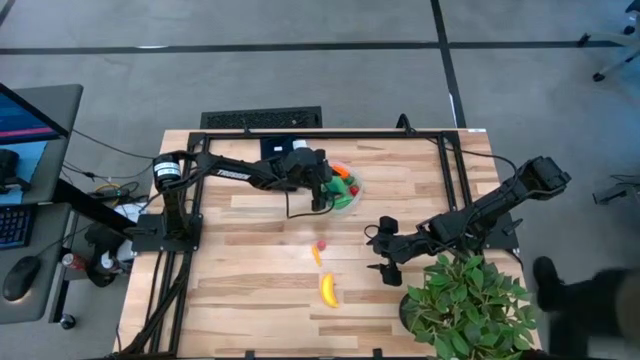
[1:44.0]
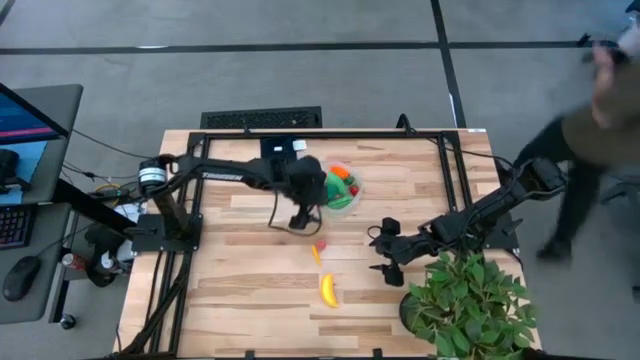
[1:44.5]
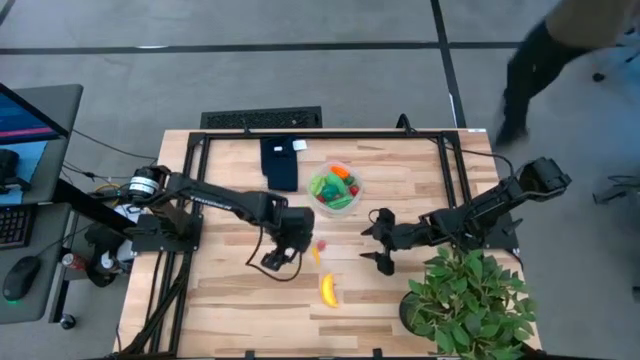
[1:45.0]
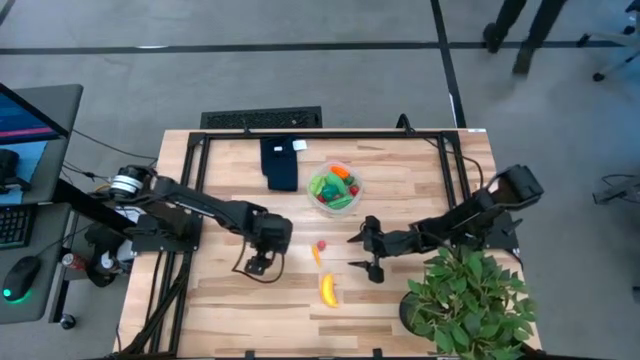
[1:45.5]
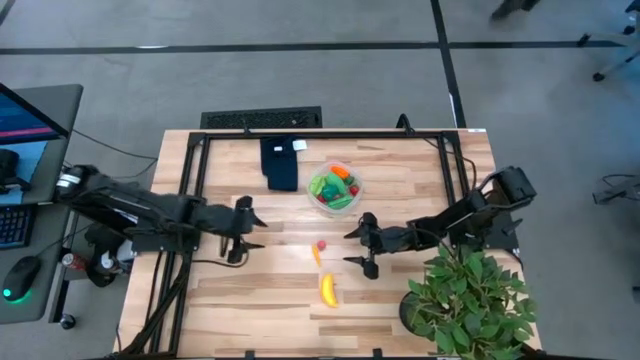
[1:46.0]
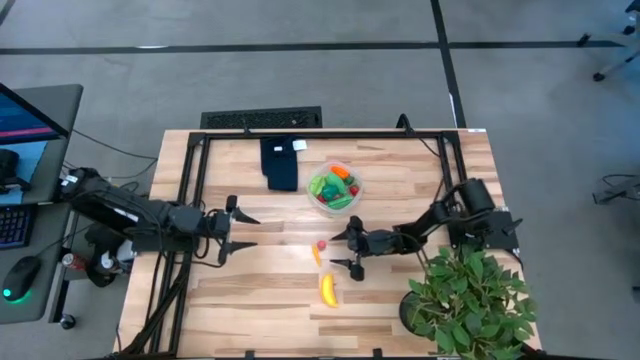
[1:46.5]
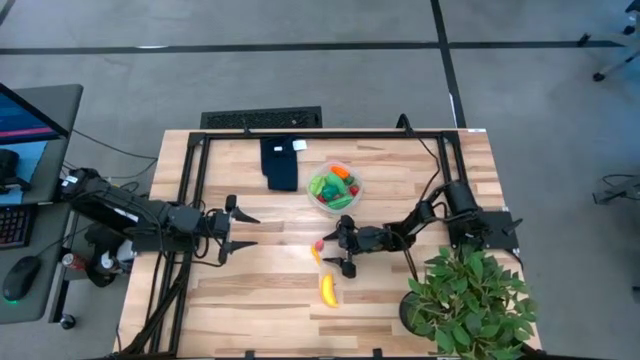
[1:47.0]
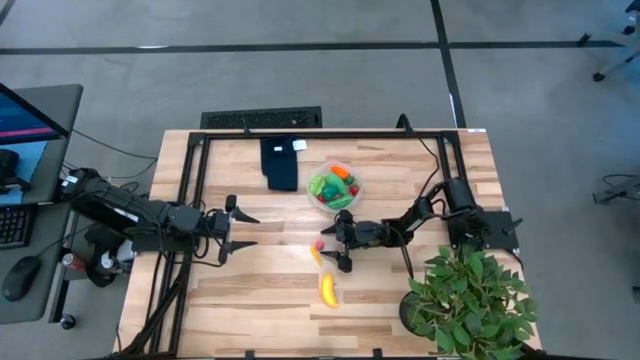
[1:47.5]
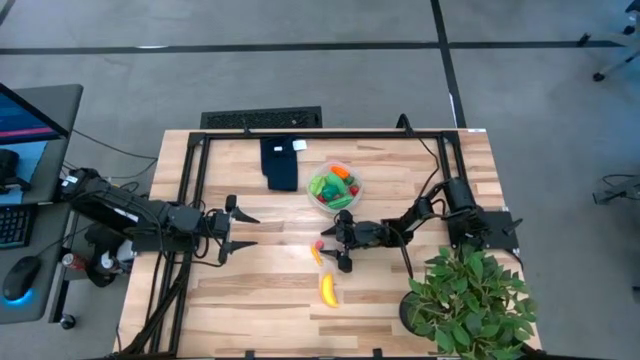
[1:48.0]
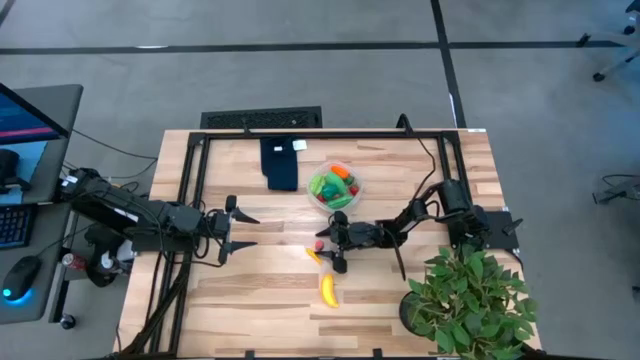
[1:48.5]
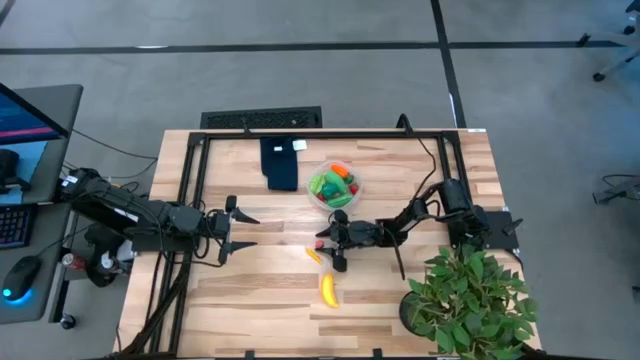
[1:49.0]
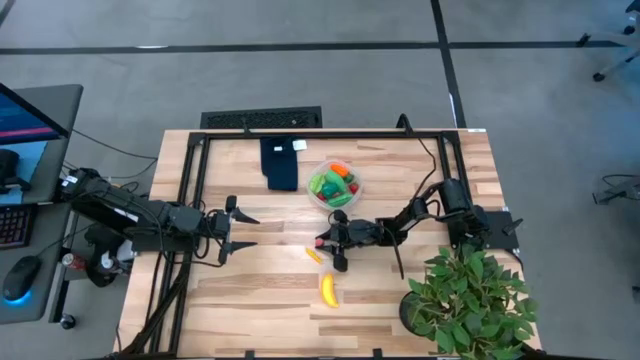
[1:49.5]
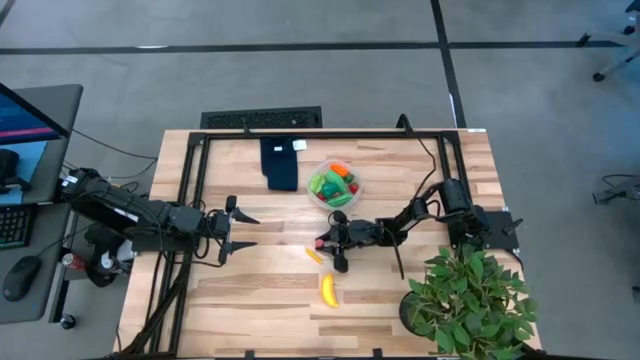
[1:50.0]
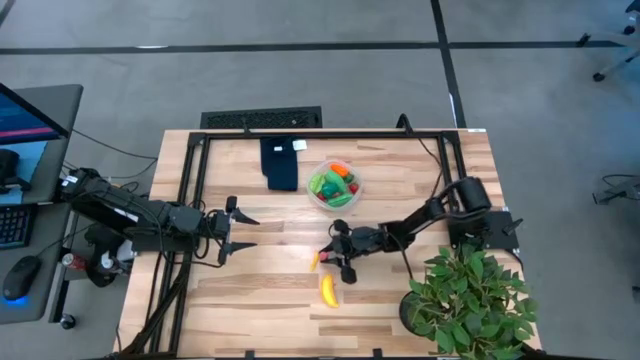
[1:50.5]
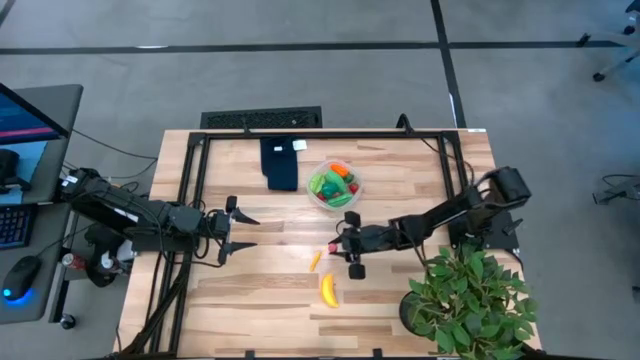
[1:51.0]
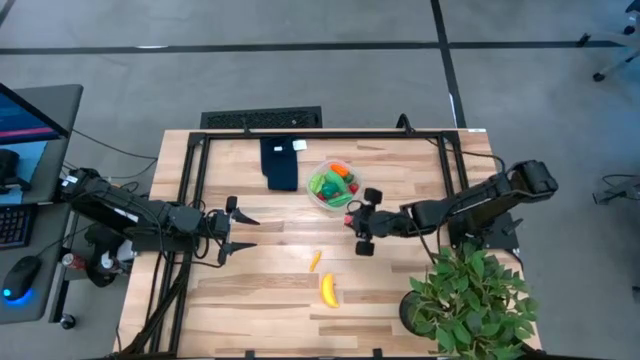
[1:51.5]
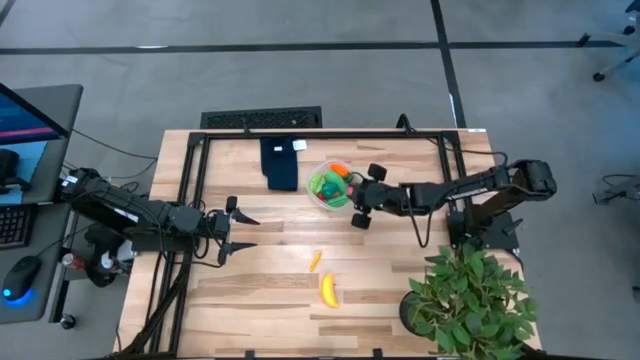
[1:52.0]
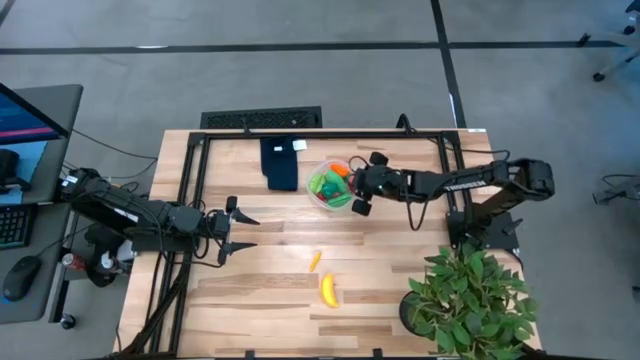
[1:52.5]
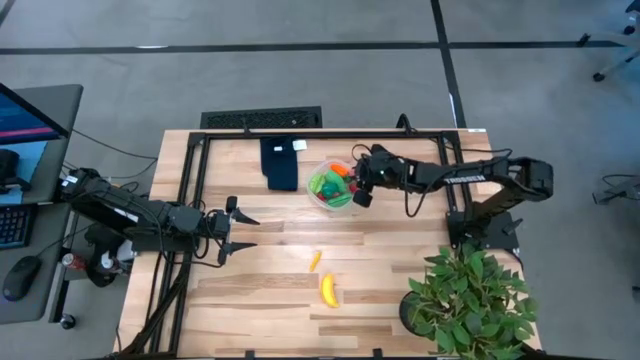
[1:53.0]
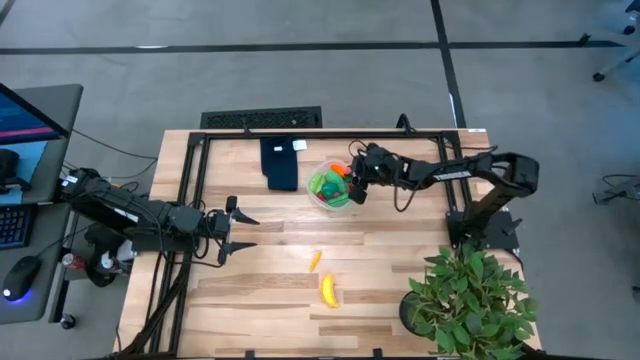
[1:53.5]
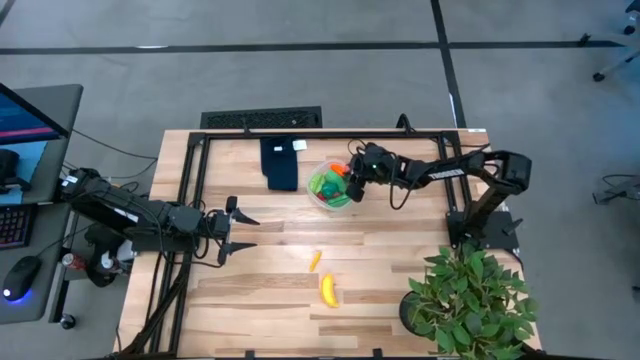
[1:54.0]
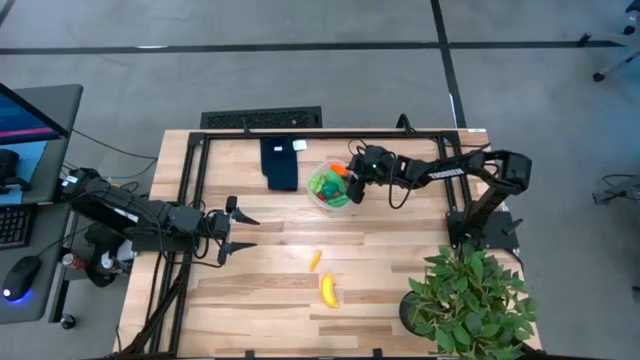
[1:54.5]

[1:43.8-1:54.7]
Task: Pick and placing Produce into tupperware
Put the pink peach into the transparent container

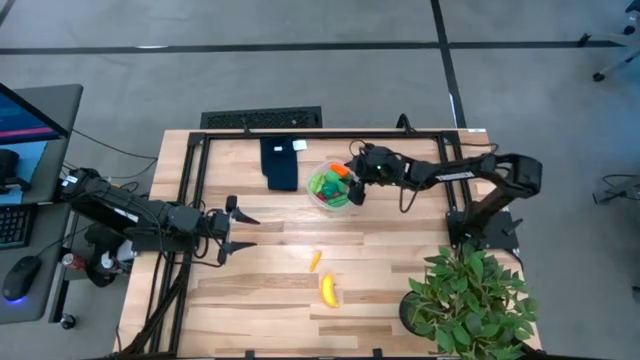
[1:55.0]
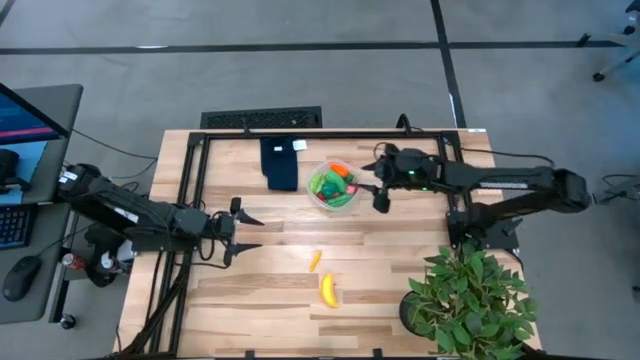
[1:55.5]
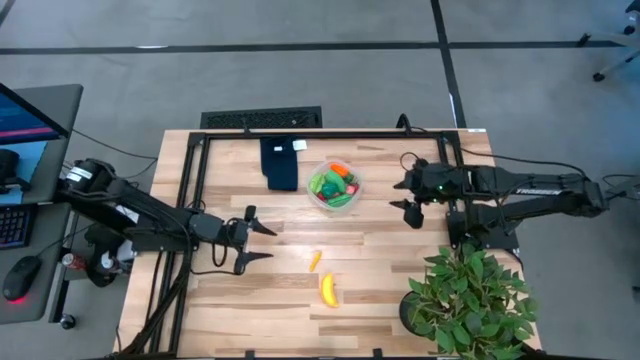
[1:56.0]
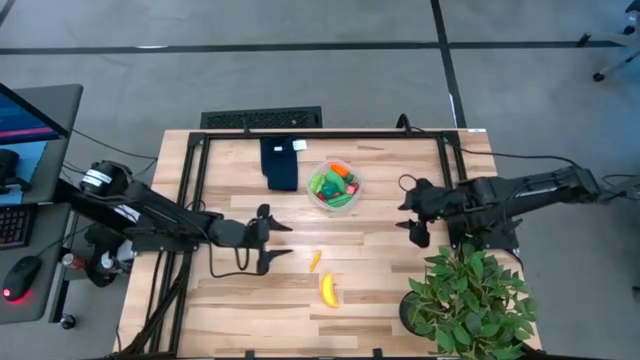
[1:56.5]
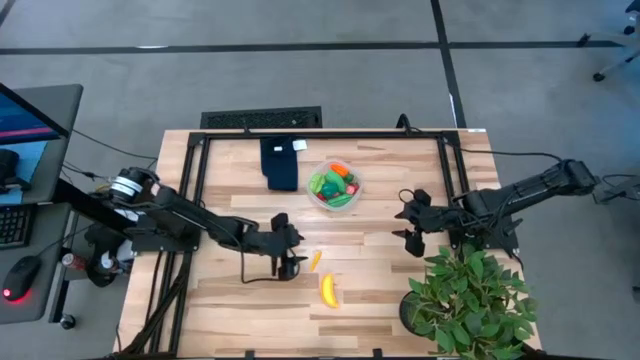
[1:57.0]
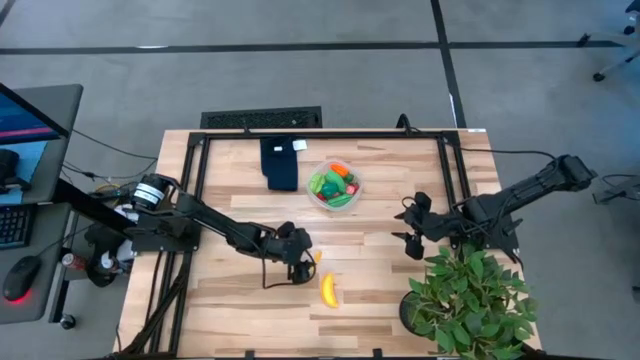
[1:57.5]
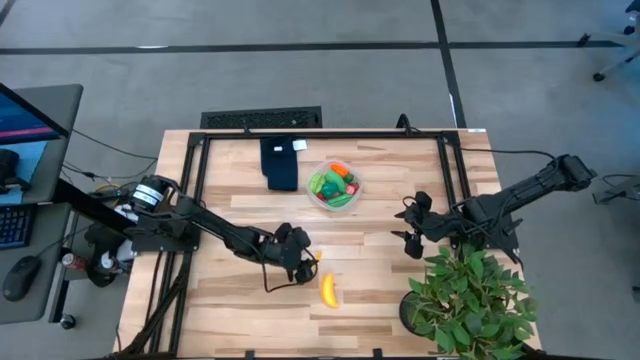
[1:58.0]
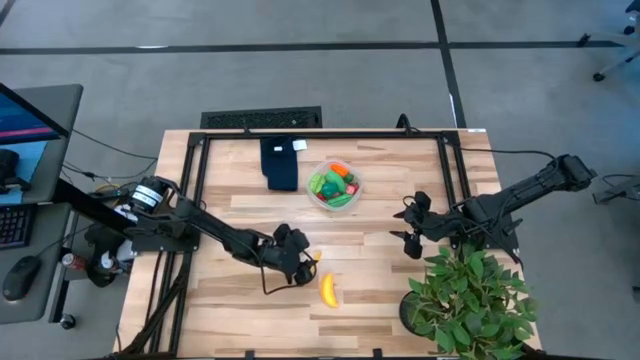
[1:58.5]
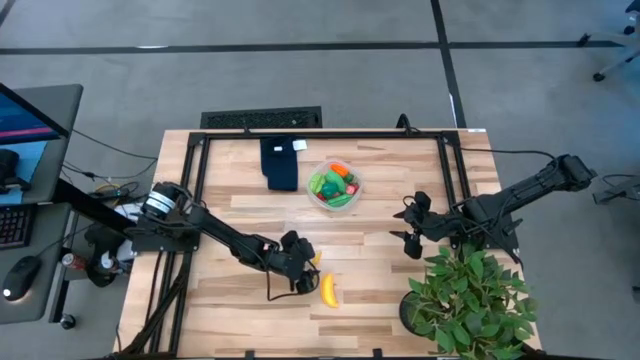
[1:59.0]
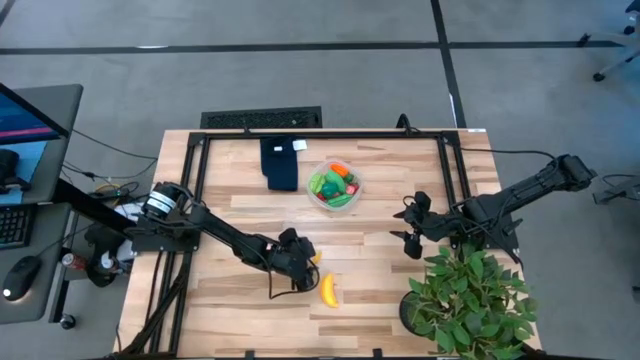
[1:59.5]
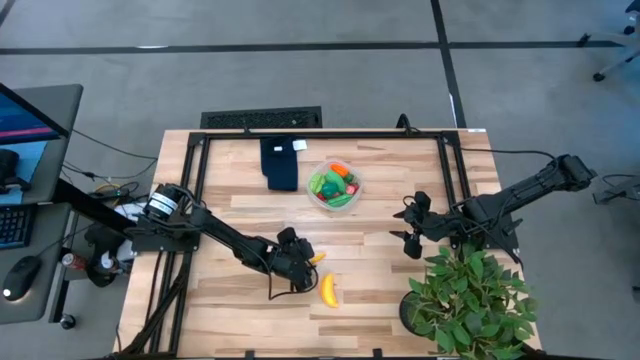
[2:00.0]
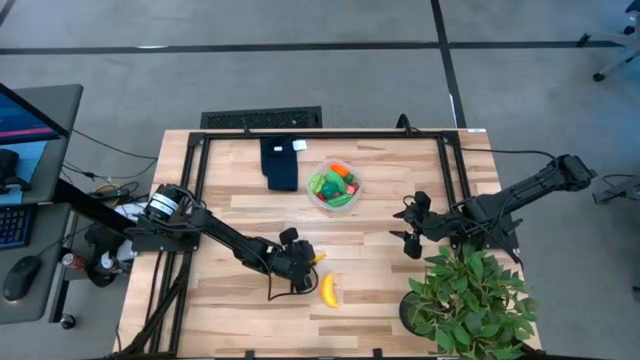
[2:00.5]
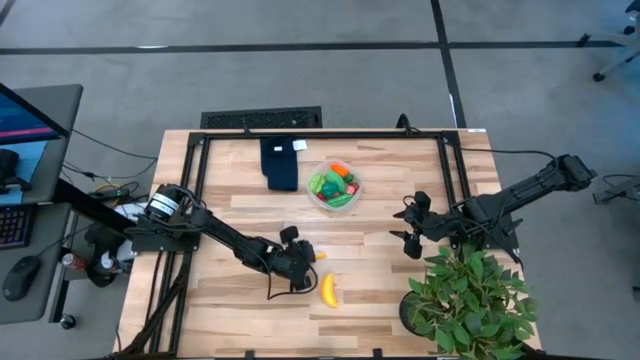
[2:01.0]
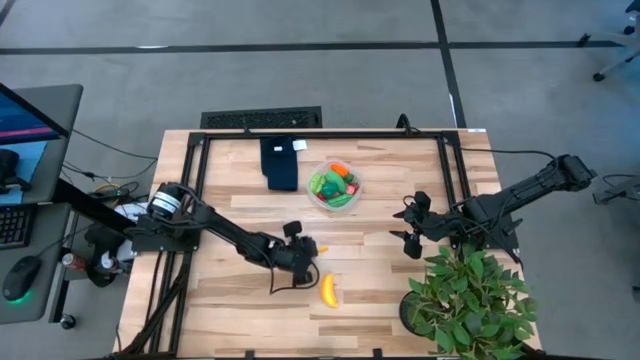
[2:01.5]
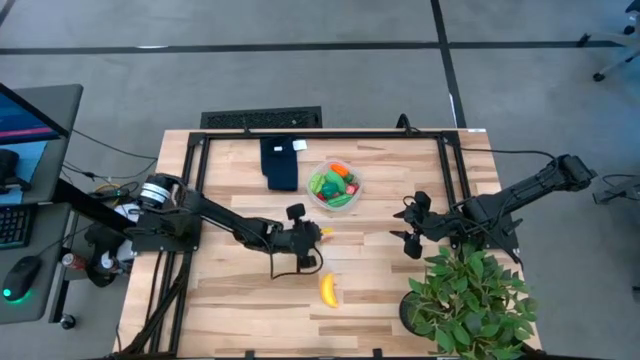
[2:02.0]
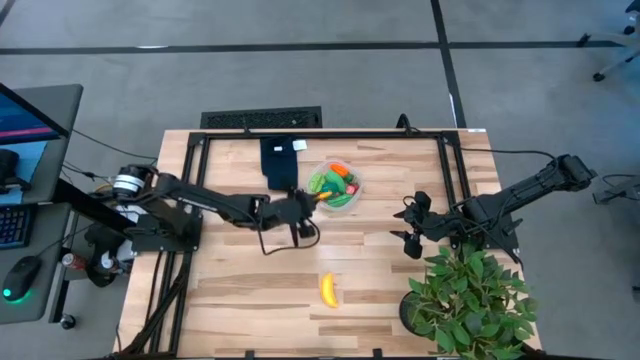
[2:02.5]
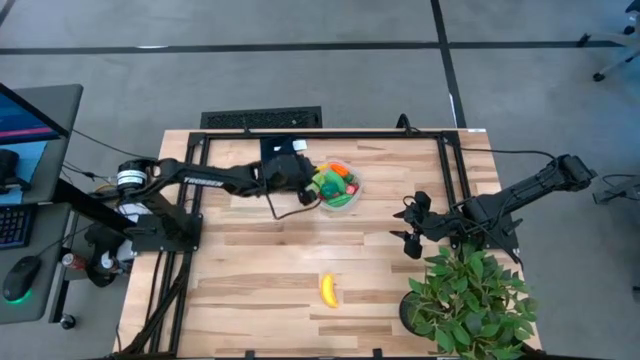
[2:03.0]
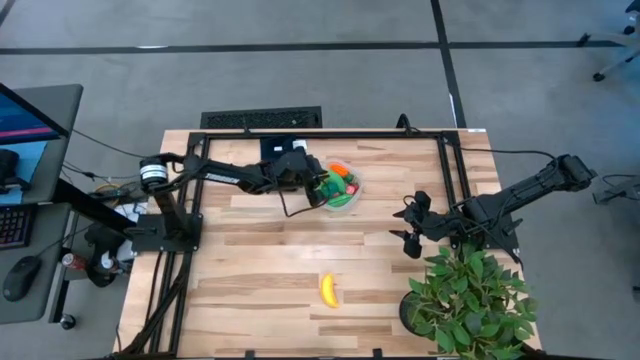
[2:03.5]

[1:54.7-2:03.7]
Put the yellow corn into the transparent container

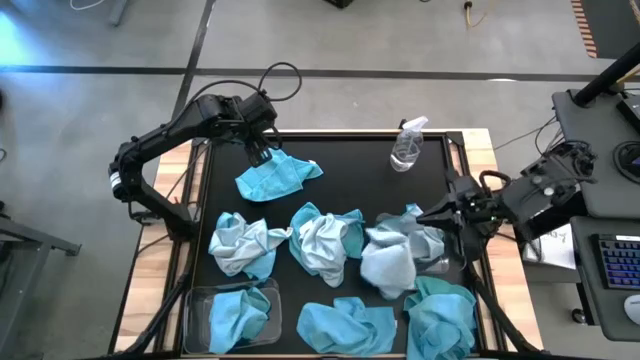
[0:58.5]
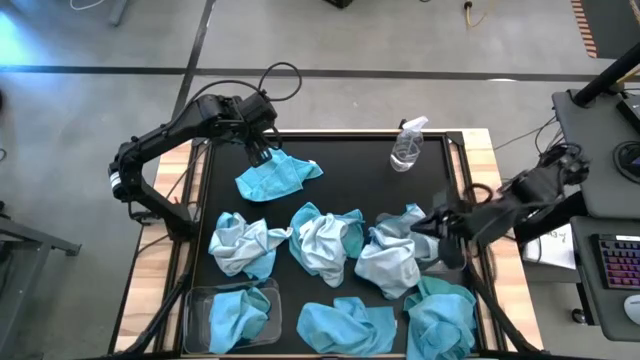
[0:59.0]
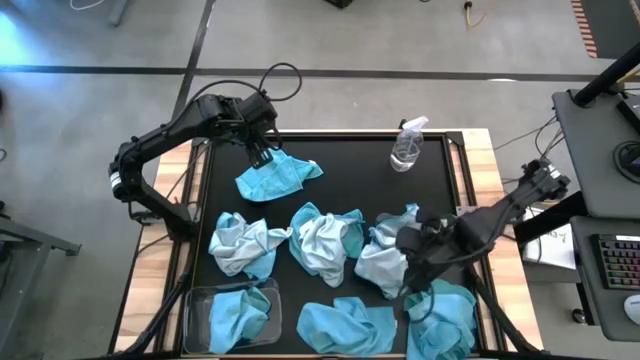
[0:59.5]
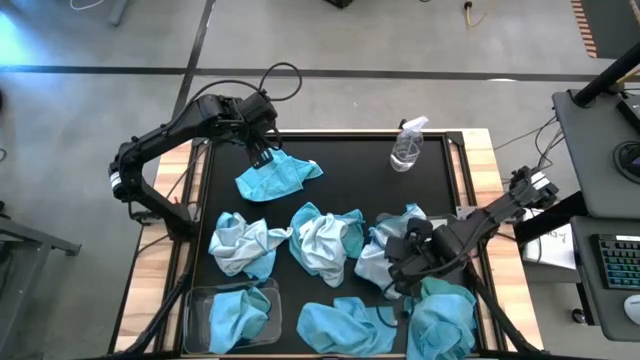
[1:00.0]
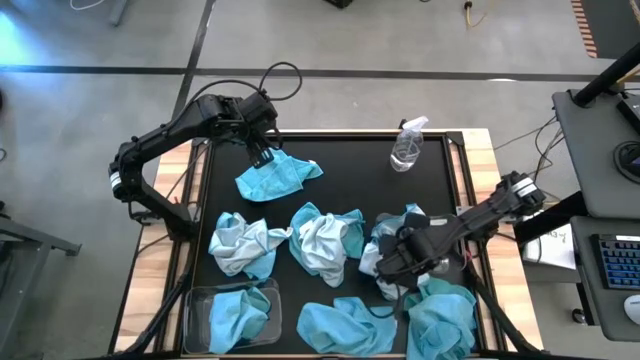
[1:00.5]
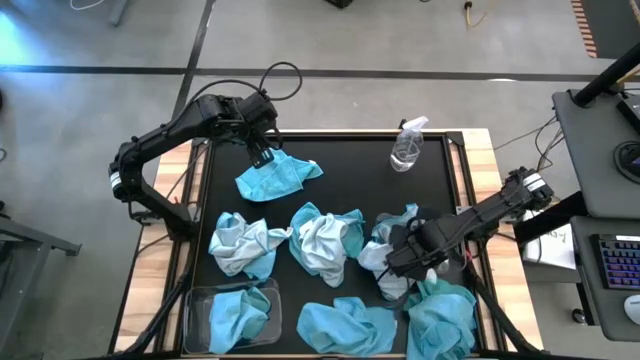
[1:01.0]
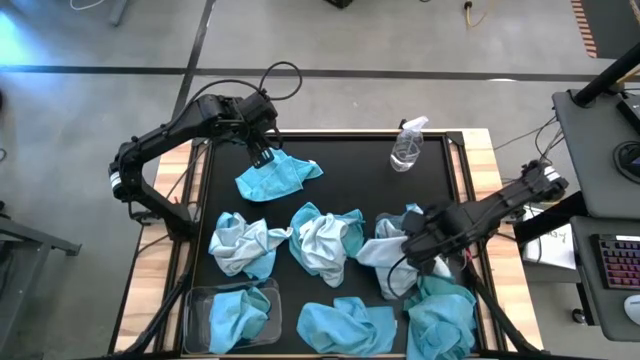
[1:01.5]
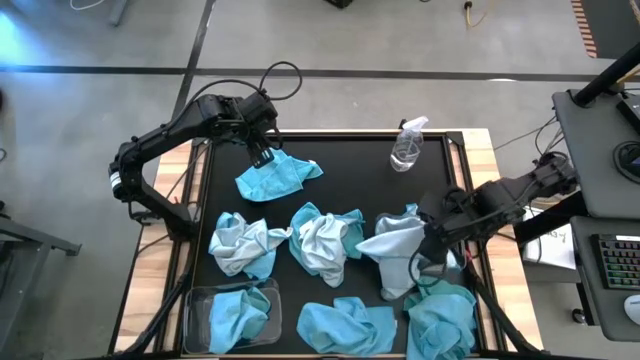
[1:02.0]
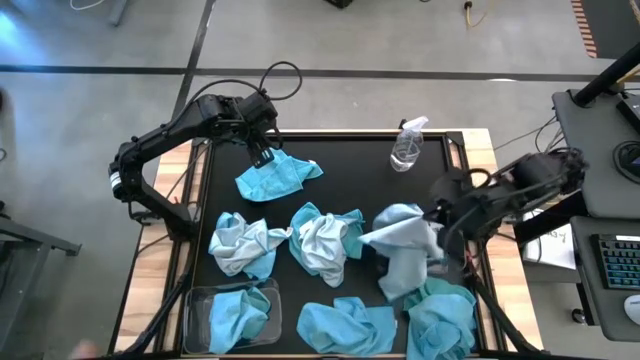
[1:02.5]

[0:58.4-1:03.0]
Task: Sort microfiber towel by color & place in baskets
Put the light blue microfiber towel into the right transparent bin
